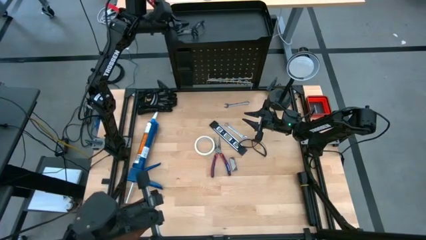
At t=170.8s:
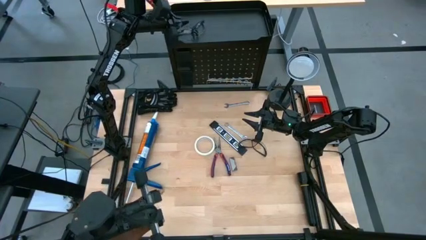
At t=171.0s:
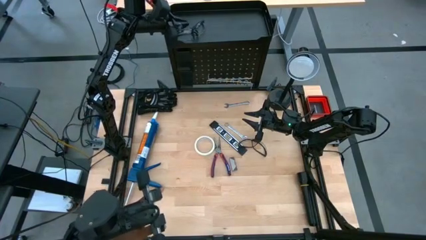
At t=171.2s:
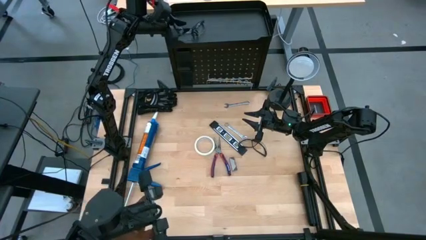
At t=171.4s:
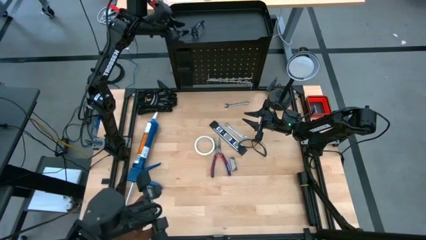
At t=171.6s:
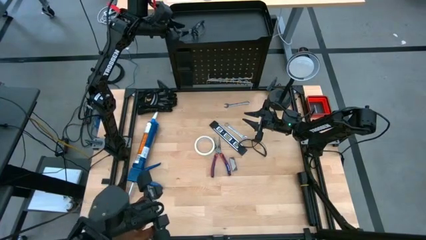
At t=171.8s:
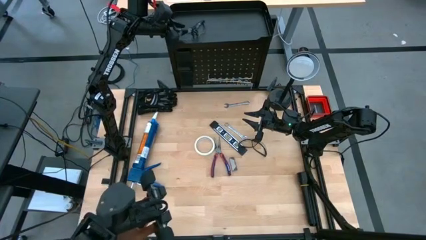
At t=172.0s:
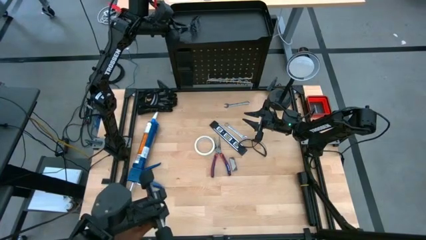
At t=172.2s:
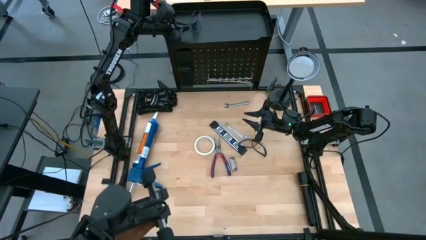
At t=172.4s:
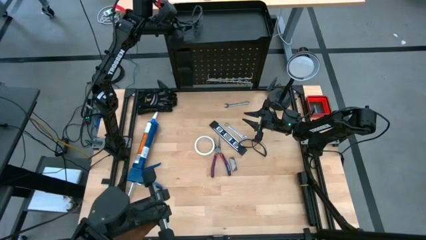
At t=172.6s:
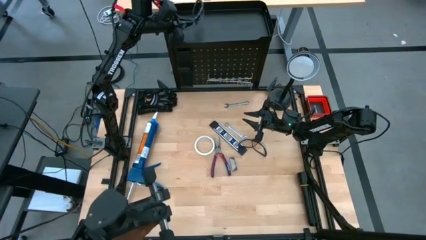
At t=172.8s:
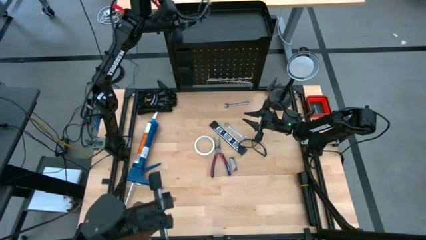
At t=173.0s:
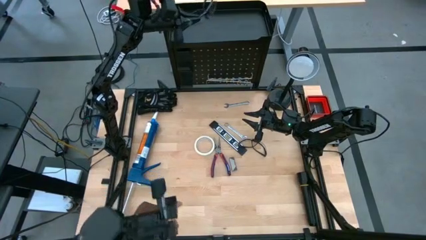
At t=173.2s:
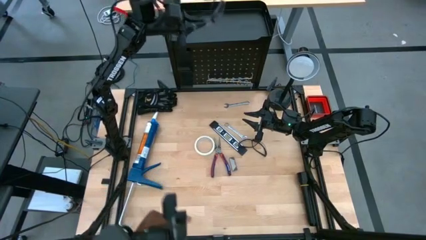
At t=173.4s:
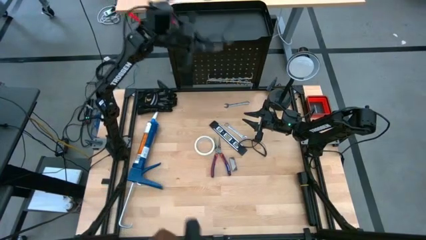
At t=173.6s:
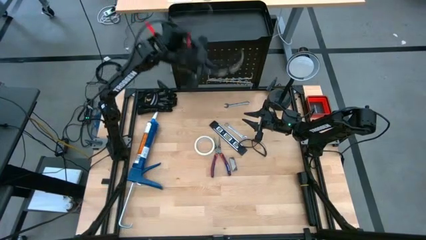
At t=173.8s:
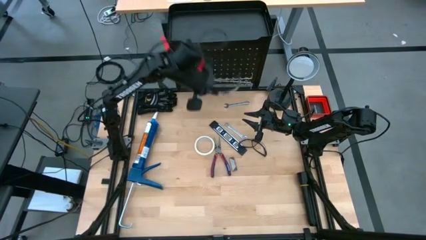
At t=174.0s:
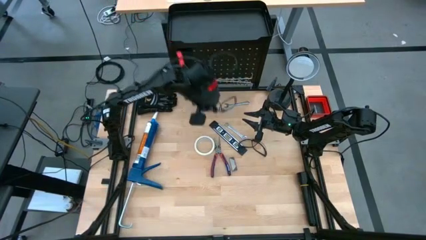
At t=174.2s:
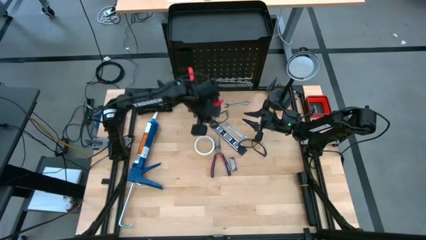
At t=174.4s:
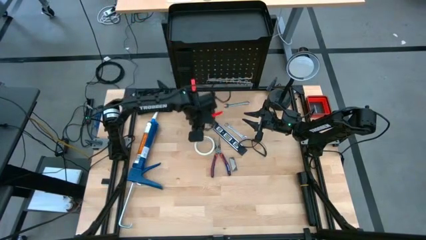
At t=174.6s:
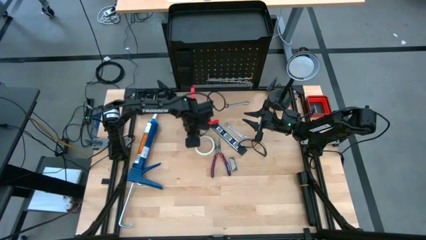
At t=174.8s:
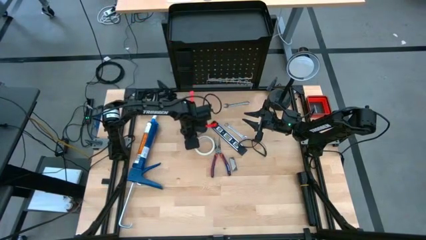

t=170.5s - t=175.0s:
Task: Hang tools onto peg board
Remove the black safety glasses from the black peg board

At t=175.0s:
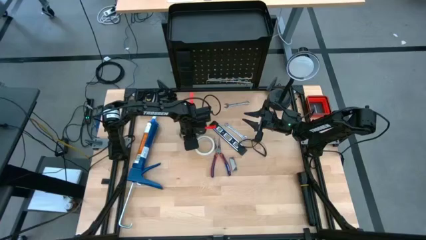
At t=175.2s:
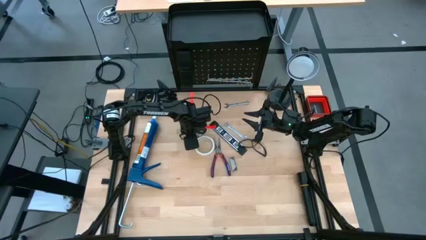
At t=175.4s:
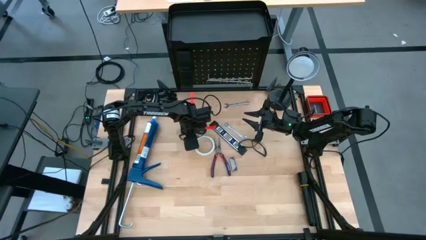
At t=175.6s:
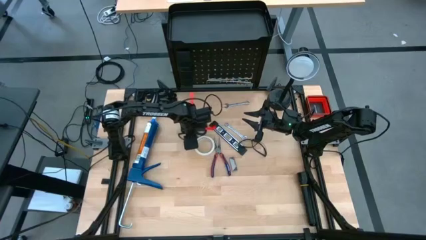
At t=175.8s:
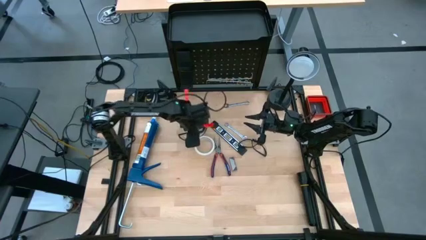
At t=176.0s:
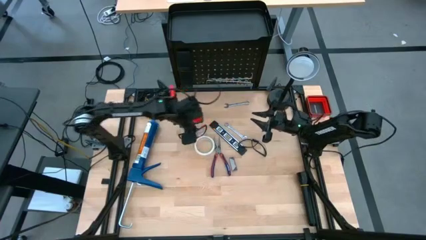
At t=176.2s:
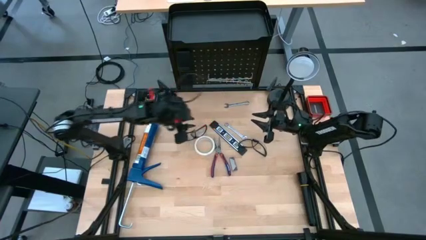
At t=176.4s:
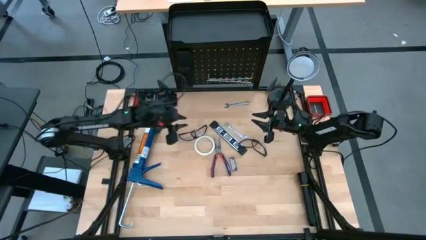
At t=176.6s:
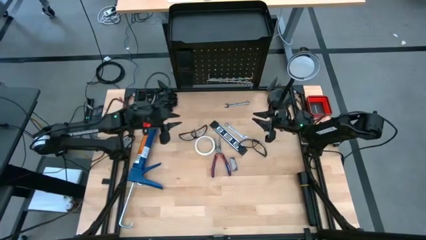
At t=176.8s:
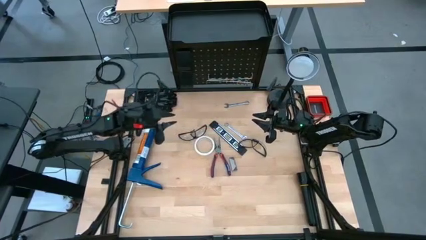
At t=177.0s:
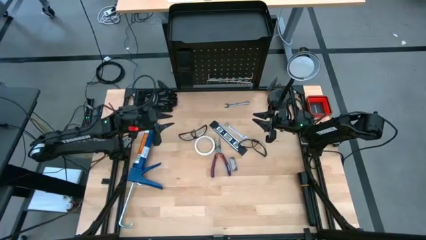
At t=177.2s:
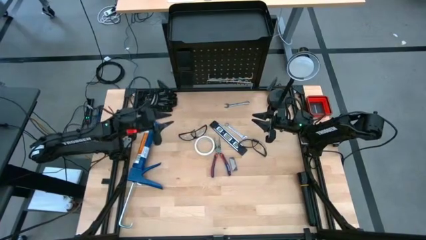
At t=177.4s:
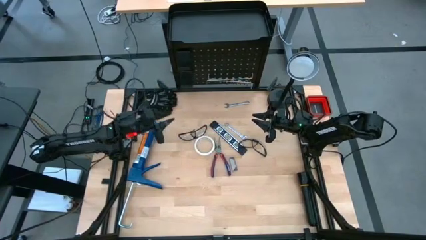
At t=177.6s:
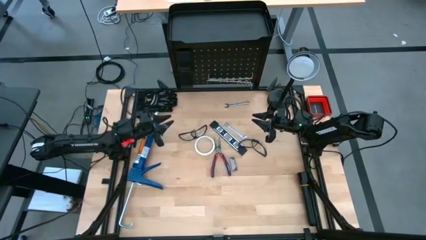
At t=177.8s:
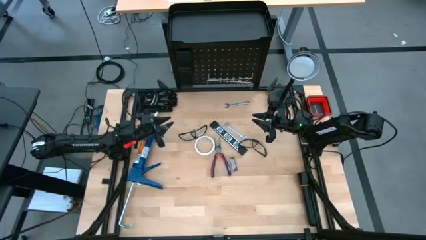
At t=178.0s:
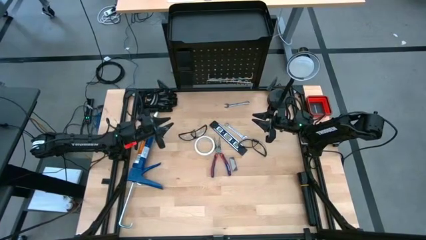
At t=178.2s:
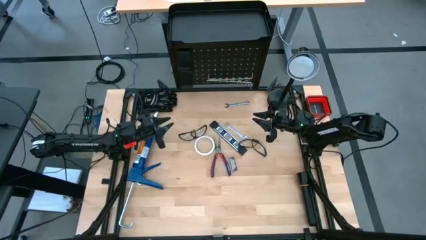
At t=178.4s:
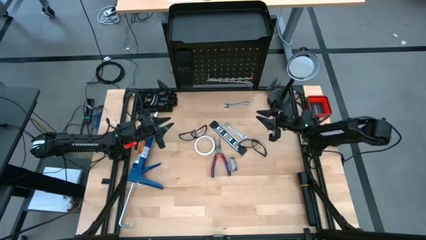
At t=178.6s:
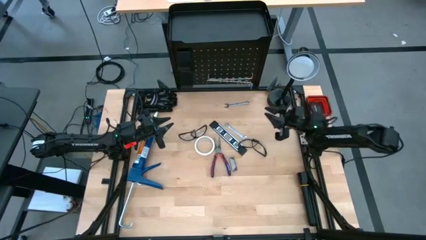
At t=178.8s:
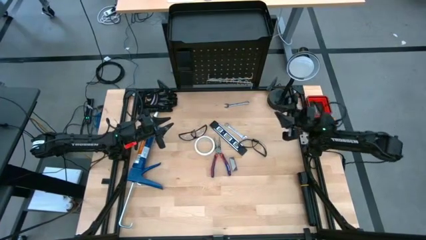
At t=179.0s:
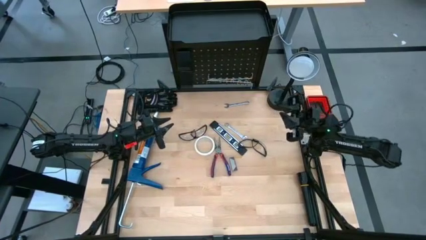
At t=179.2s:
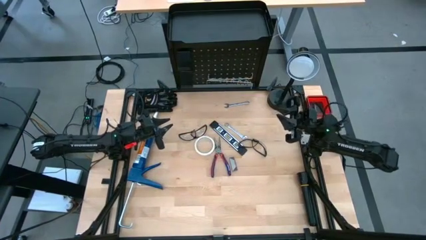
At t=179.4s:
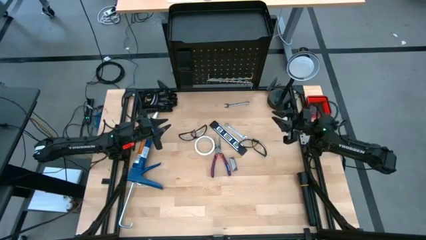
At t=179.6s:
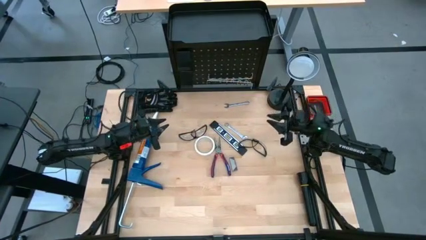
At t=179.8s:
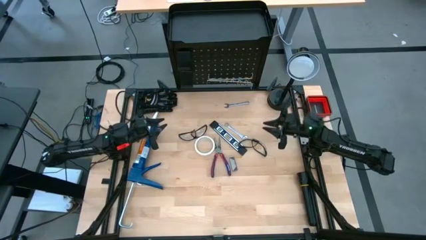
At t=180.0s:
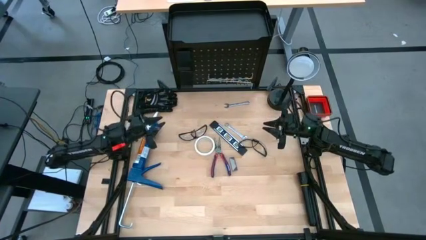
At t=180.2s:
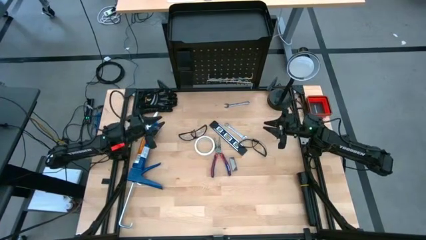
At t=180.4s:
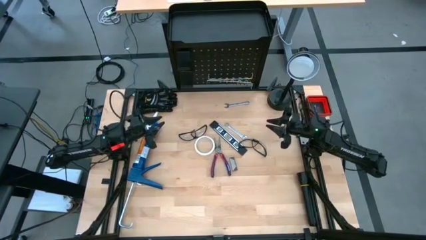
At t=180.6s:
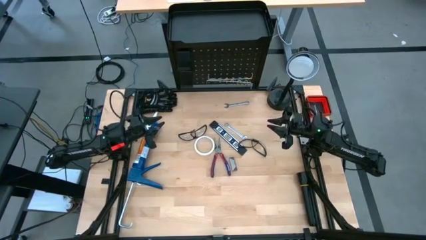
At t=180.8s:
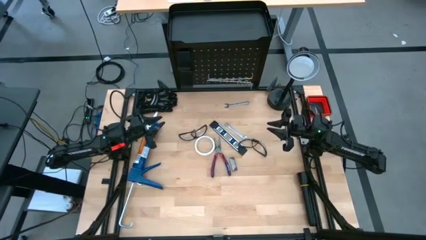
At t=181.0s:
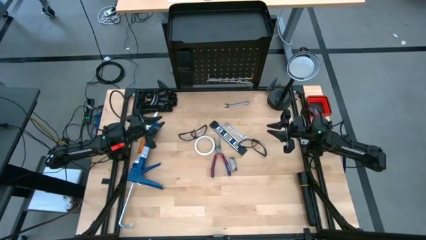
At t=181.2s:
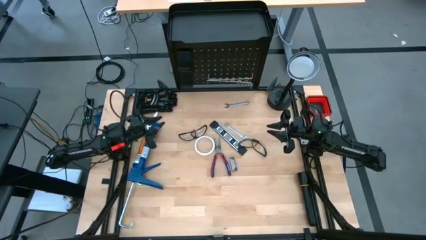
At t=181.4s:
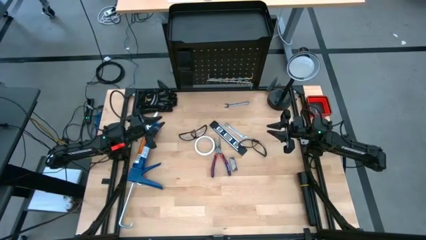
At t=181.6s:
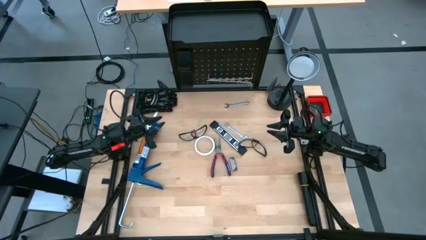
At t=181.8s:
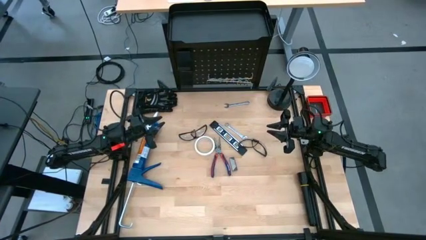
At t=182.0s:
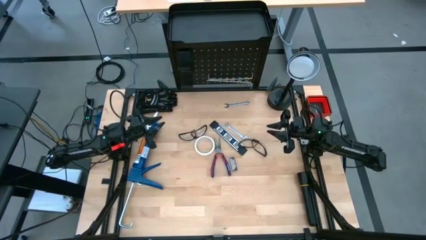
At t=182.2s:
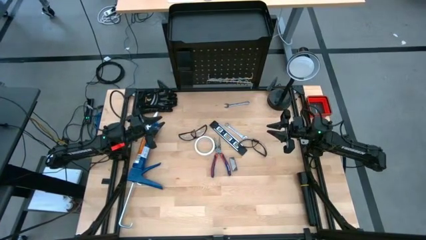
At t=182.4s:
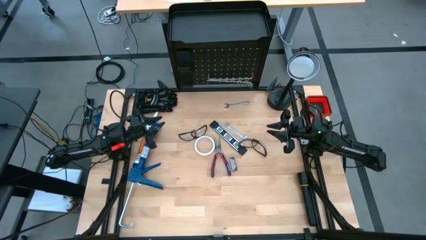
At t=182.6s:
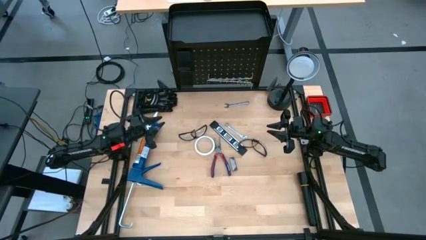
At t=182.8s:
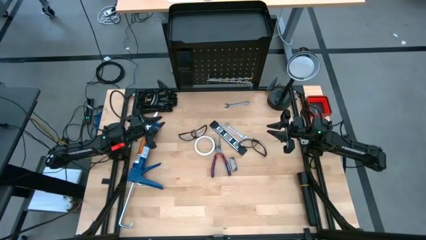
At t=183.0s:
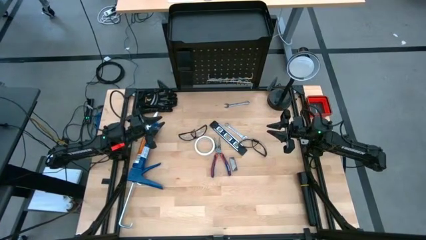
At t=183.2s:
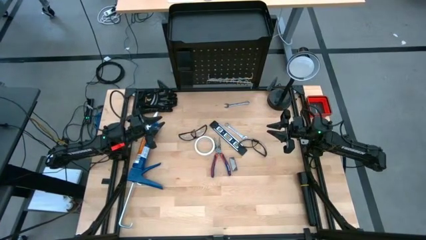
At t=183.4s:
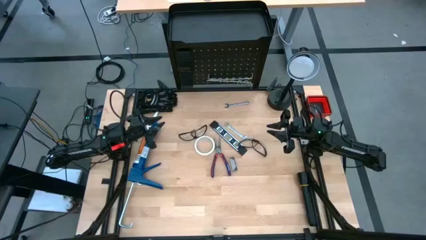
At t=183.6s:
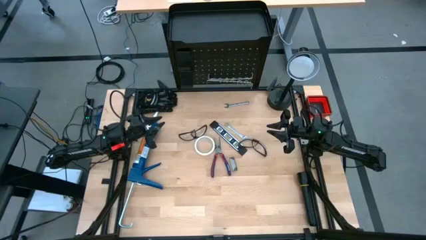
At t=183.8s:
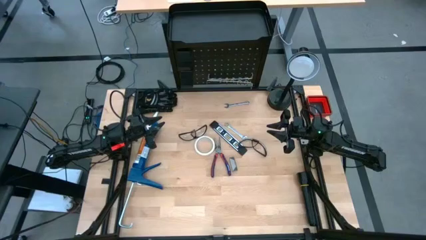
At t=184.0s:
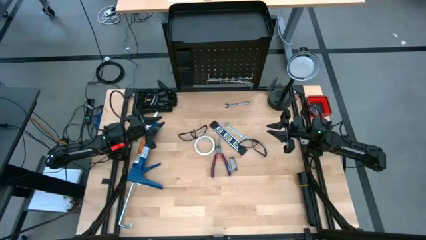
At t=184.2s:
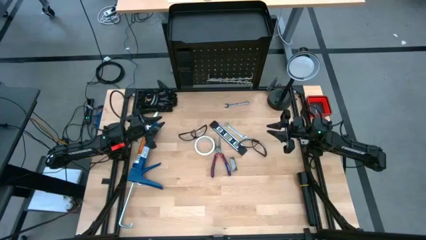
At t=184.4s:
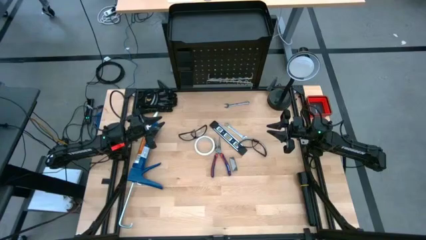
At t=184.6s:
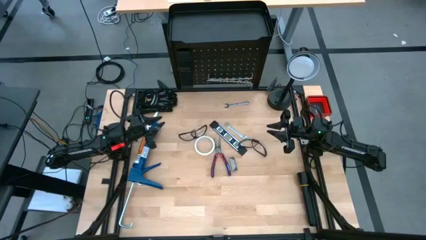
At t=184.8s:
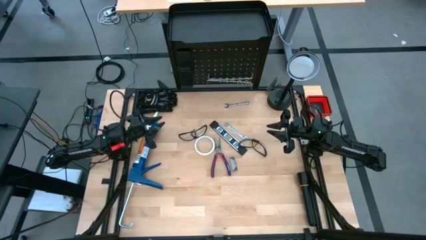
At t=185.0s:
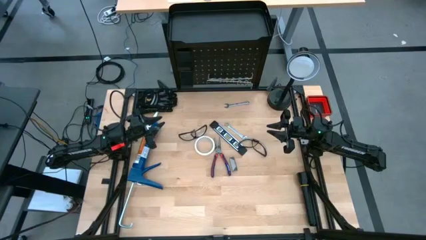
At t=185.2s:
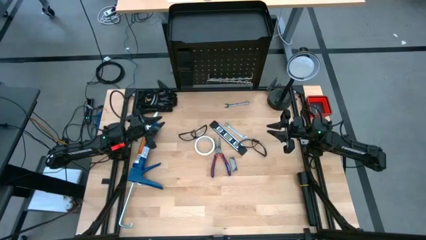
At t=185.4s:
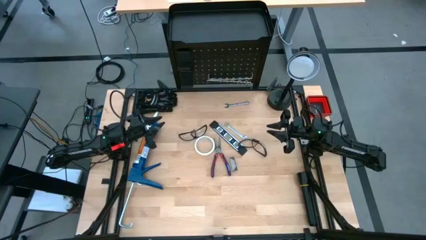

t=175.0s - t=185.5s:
Return to Home Position
